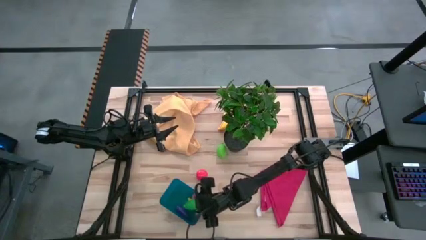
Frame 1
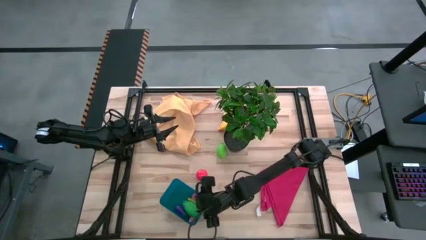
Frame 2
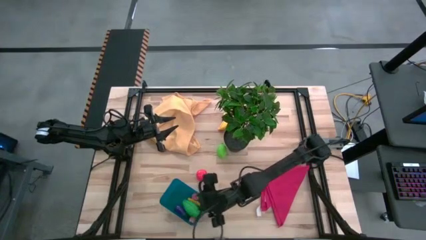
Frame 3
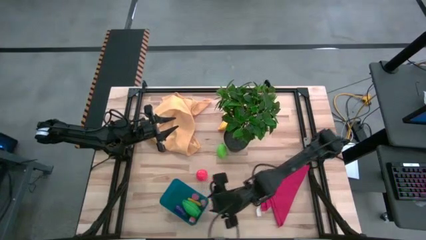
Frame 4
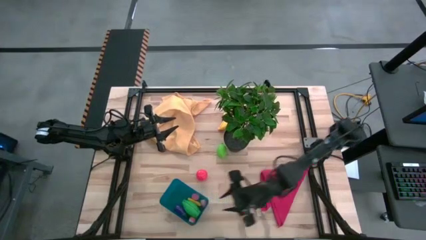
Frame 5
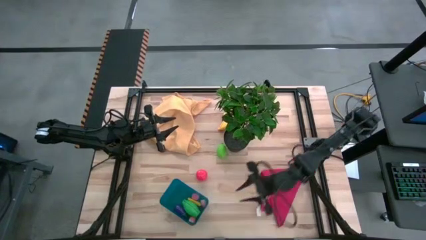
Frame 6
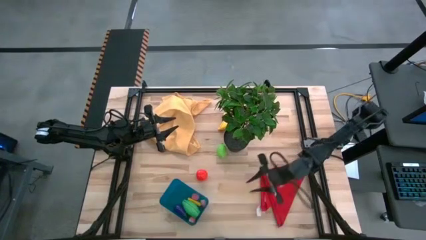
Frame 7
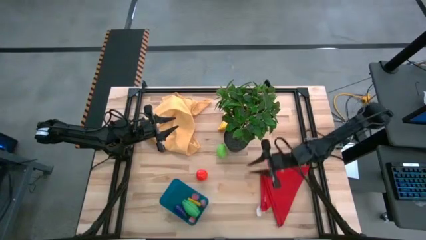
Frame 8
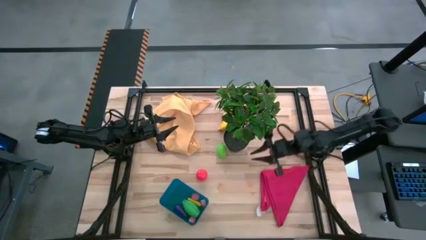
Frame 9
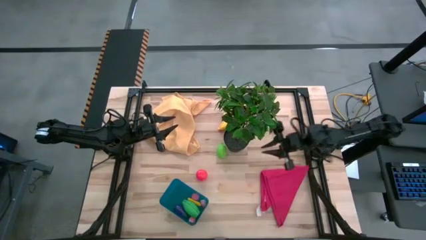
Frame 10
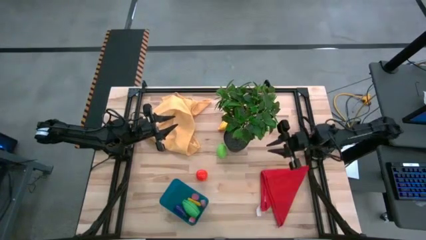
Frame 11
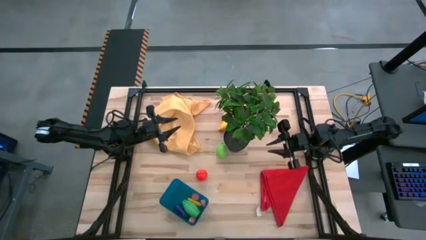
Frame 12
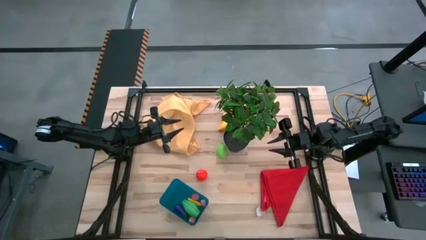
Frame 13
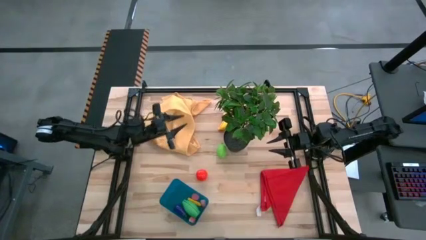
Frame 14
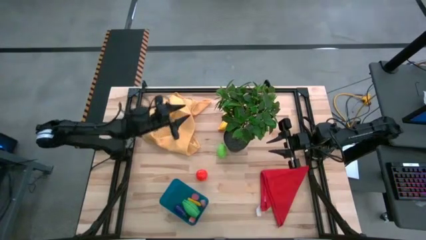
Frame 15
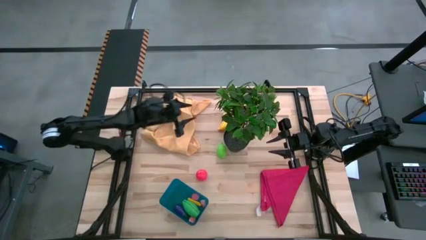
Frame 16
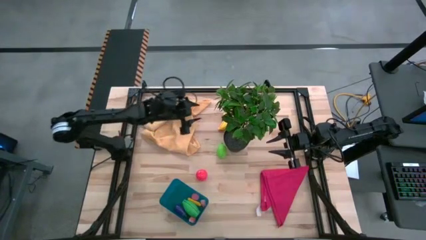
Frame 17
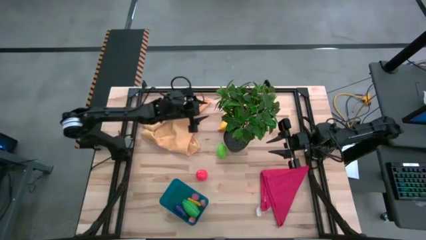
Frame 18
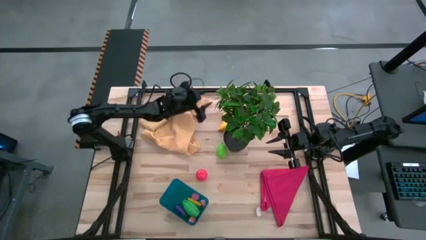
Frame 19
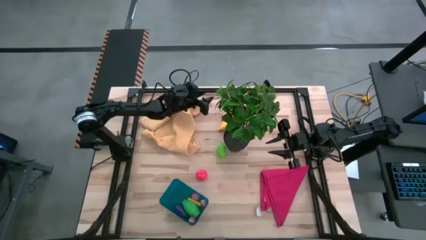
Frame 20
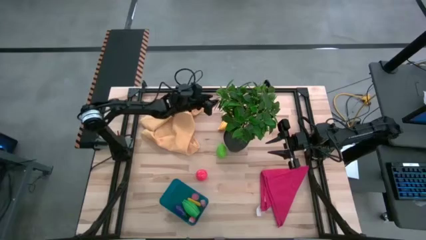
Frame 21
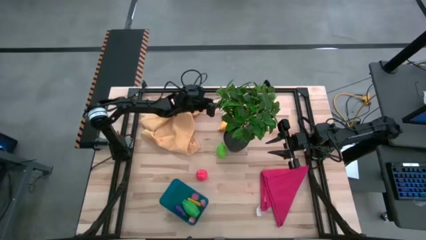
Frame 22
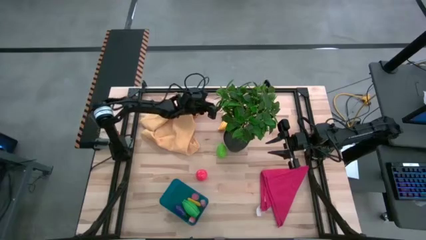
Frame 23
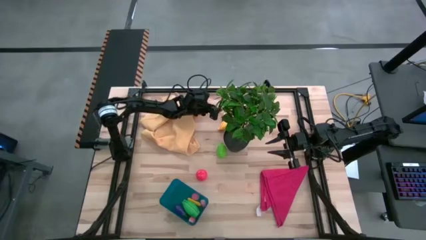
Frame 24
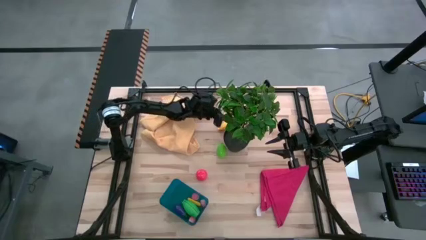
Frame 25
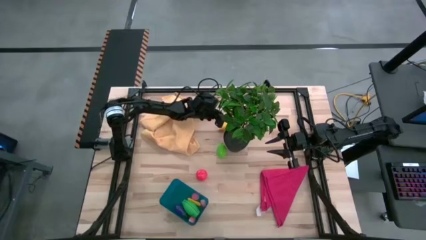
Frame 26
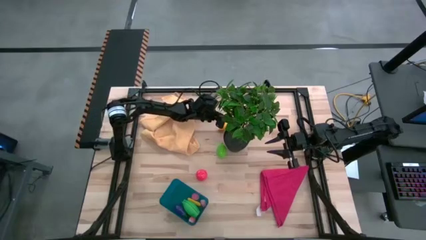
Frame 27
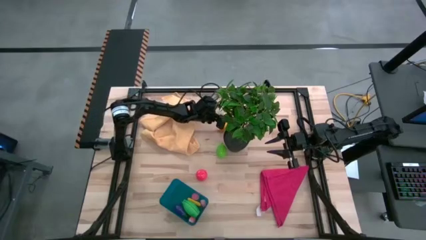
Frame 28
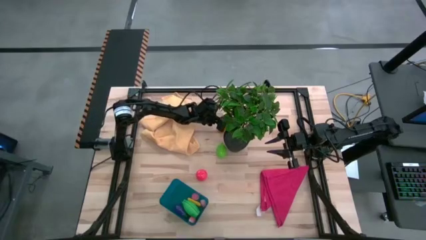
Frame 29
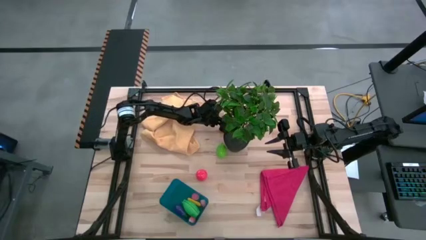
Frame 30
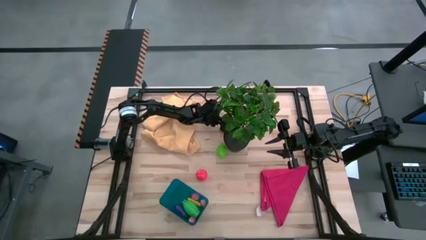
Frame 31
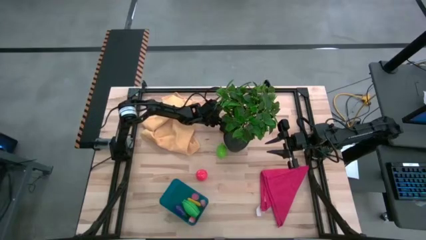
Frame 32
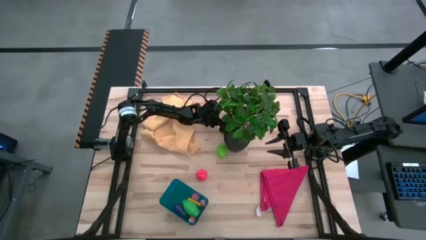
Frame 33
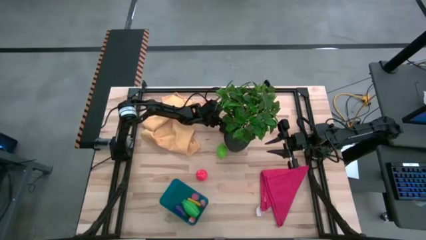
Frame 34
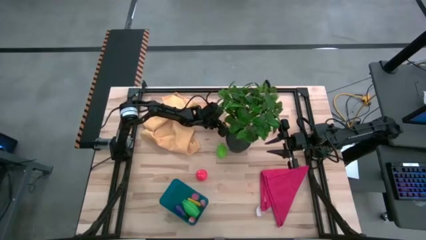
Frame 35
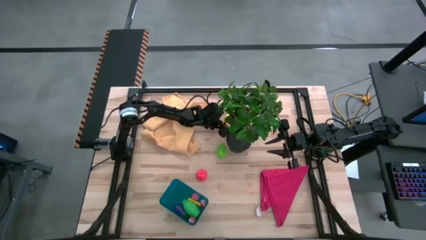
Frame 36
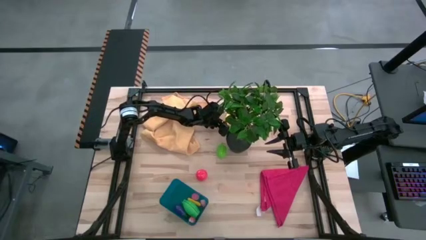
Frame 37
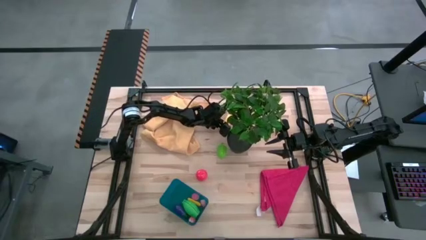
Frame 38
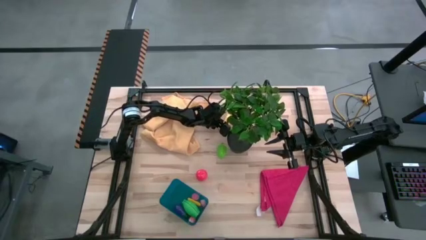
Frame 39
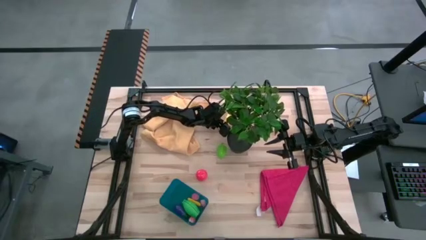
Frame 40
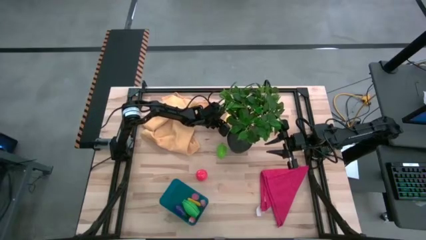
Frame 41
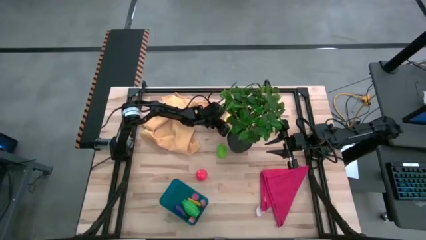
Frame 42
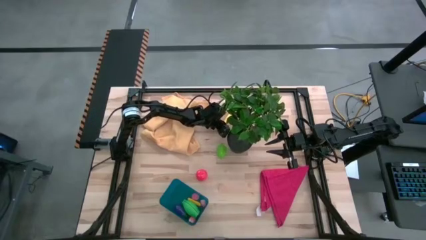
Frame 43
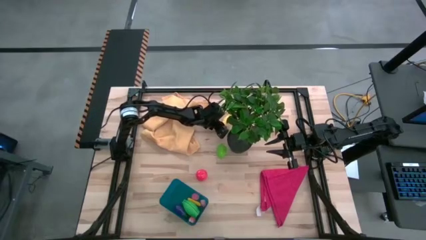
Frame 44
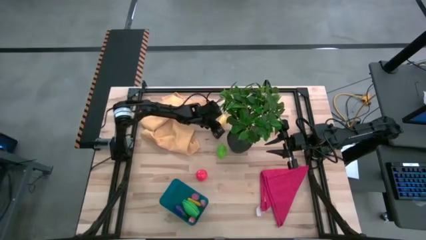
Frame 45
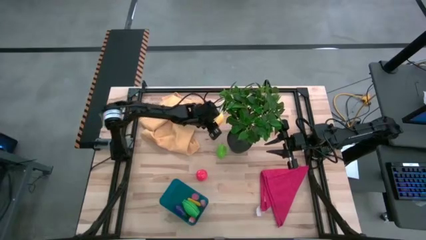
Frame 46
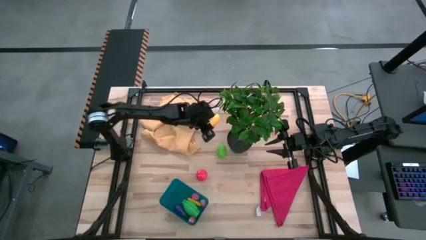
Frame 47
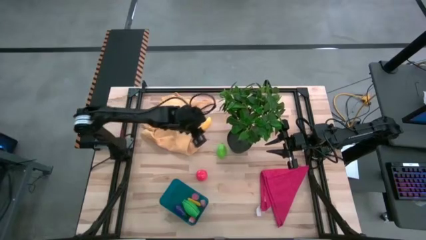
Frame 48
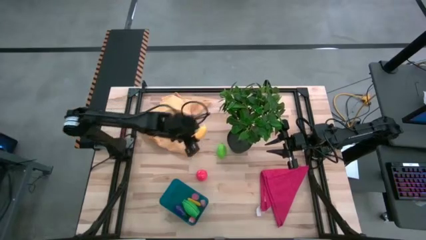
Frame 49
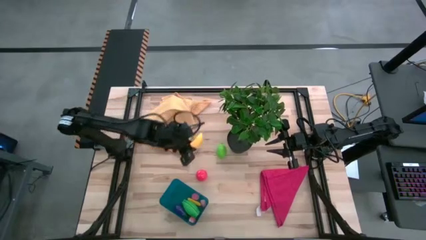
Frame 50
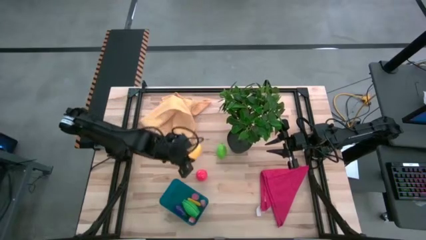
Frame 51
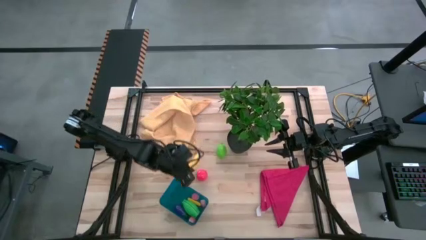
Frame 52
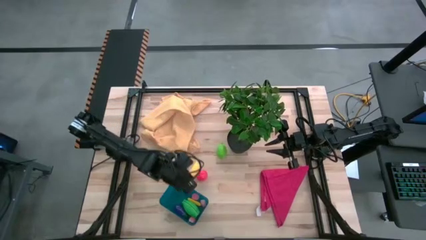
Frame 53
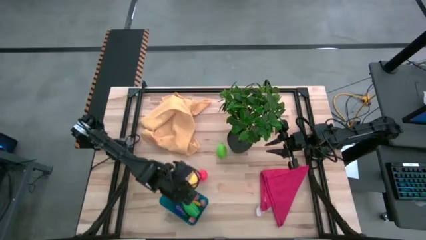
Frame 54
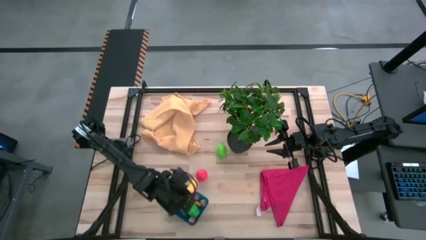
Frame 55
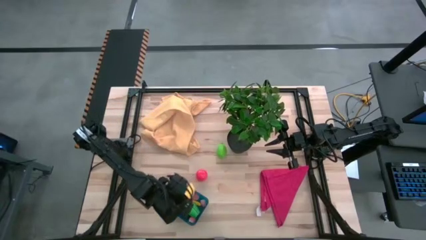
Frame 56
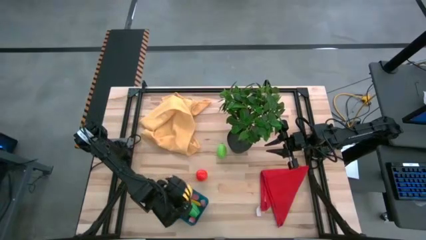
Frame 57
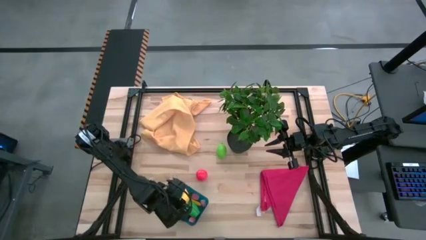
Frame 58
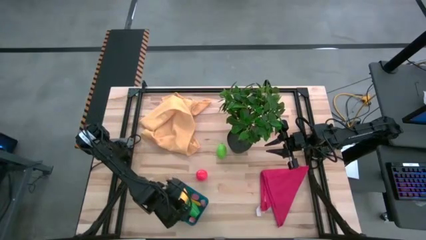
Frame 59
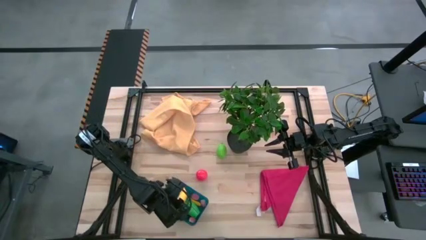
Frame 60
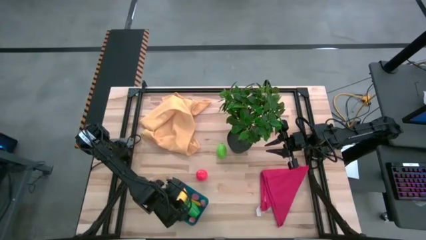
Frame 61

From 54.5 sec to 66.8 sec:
Task: Pick and placing Produce into tupperware
Put the yellow banana into the blue bin

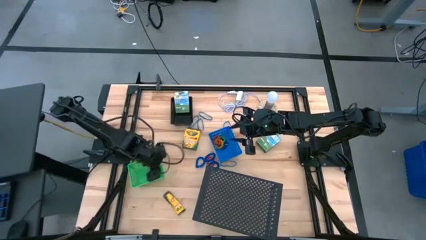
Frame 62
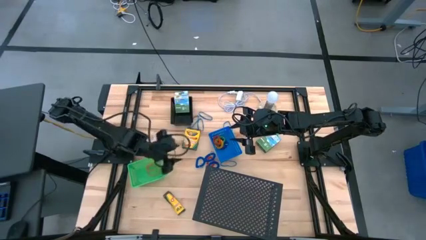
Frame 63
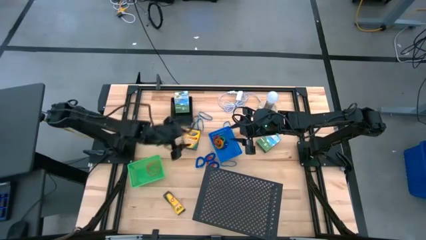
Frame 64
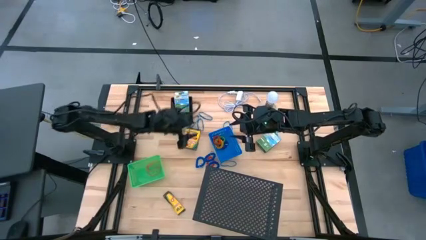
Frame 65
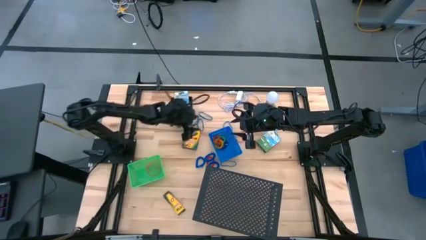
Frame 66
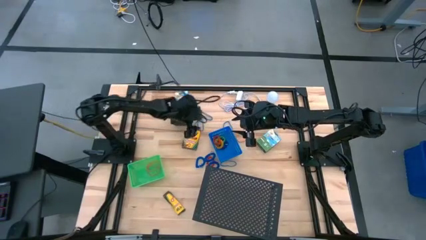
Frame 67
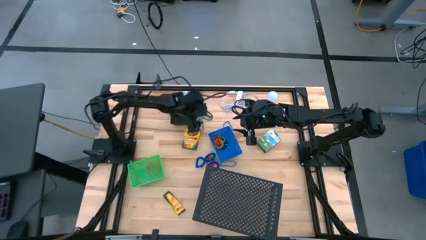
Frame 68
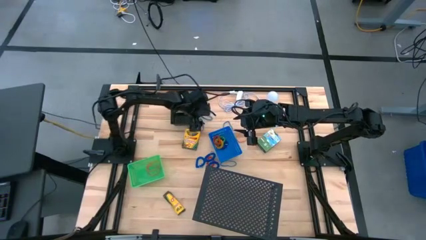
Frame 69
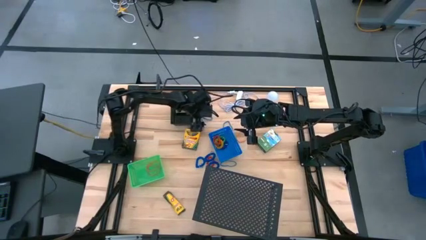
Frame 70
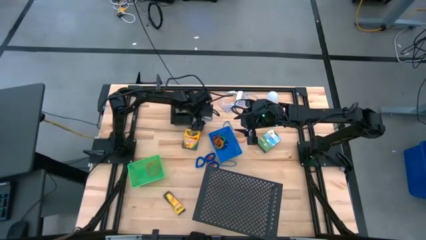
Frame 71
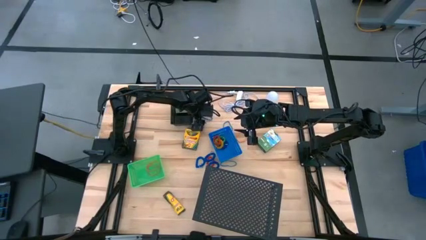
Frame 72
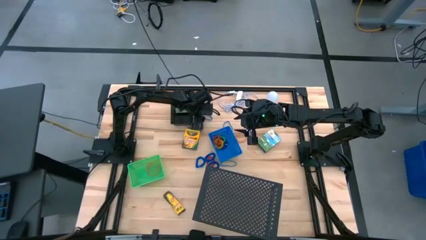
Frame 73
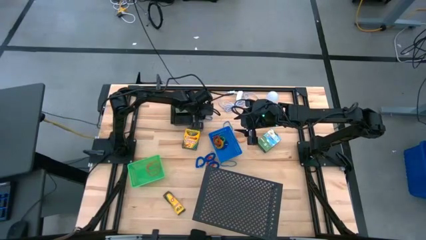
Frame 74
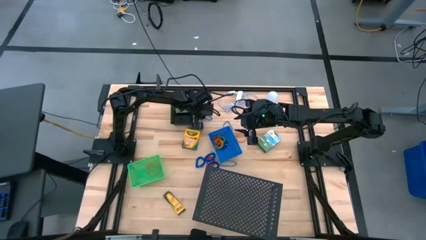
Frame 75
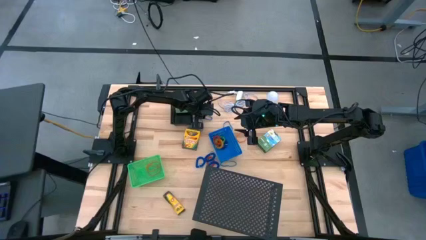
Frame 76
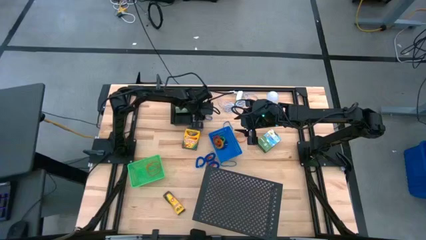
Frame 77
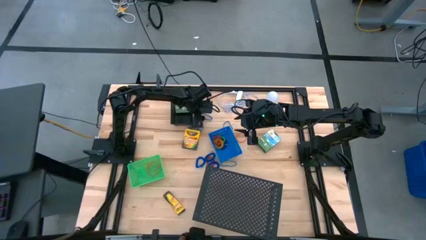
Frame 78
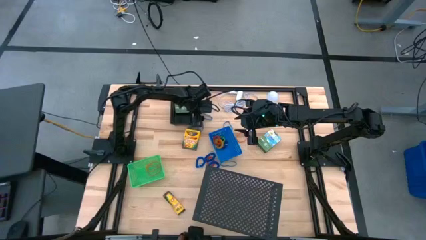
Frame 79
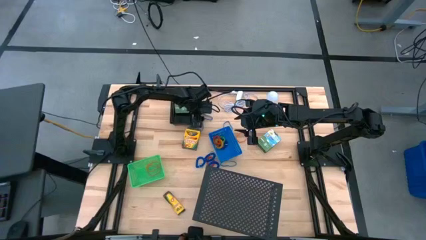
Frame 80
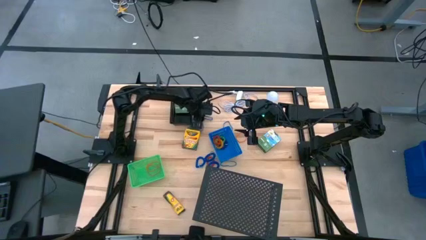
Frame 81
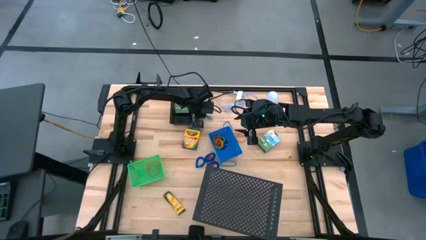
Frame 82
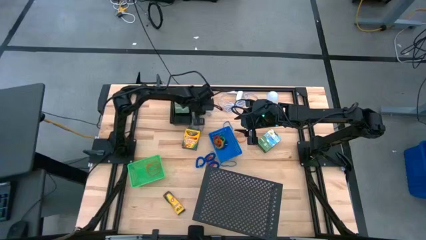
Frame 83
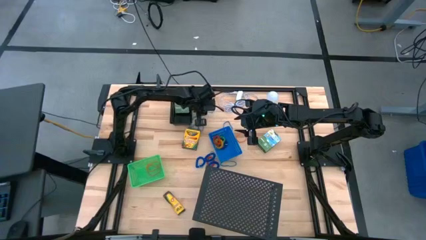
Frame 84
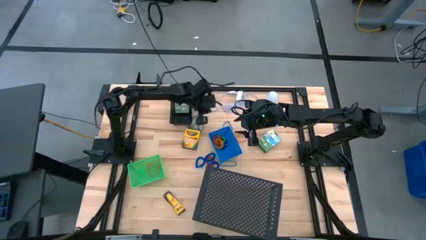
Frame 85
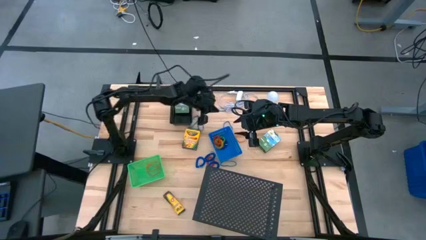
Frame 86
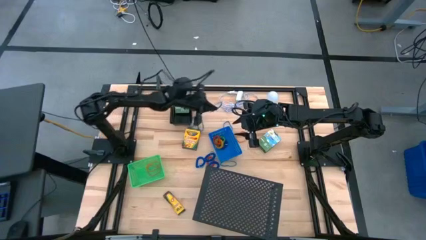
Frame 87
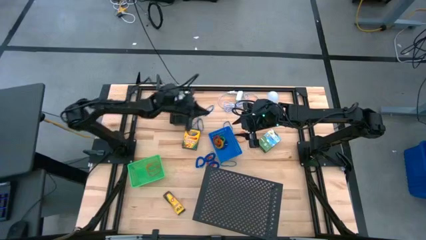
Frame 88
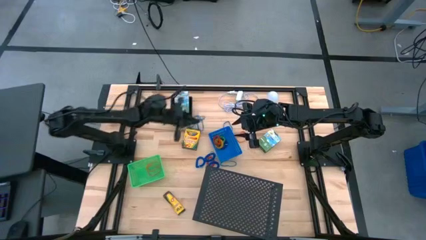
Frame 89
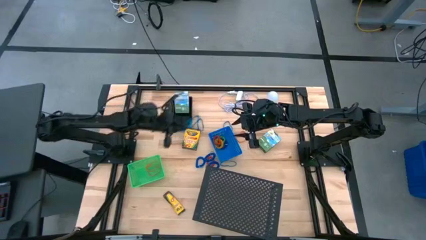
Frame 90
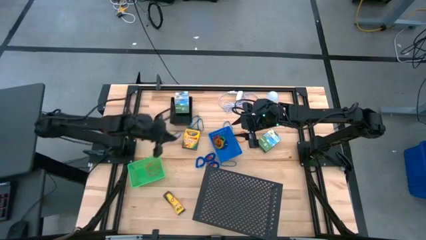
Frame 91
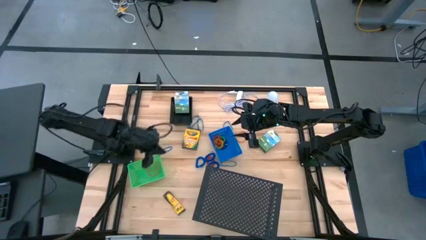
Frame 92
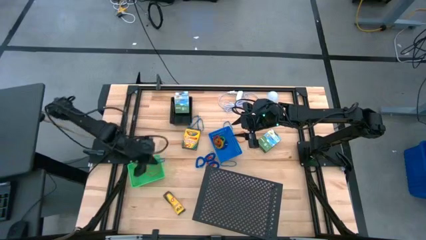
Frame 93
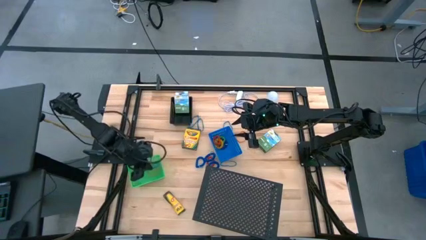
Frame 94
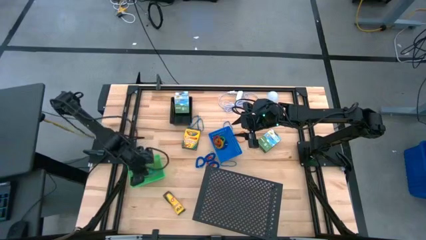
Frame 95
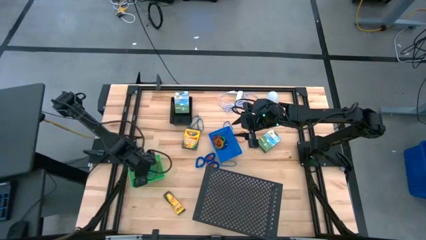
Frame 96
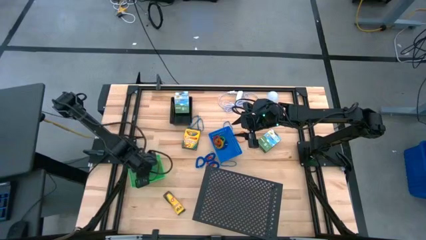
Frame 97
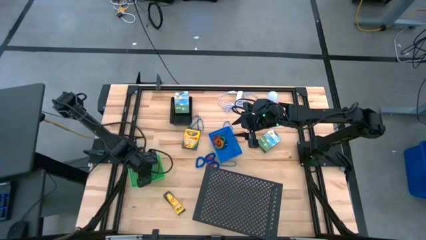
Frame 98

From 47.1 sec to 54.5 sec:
Task: Pick & Place Office Desk Supplies
Put the top blue rubber band into the green bin
